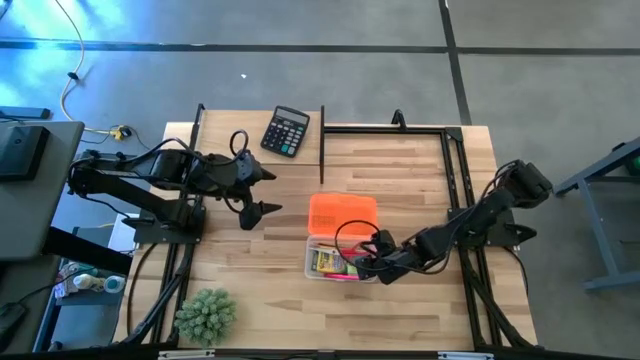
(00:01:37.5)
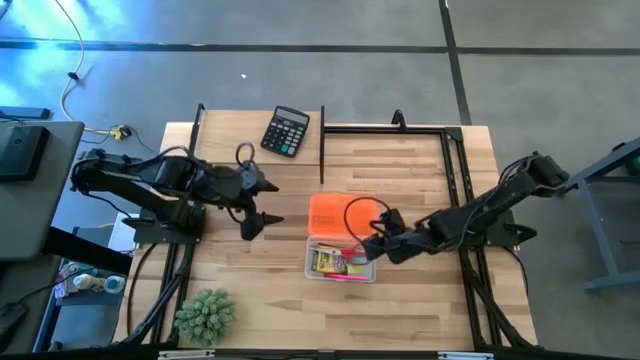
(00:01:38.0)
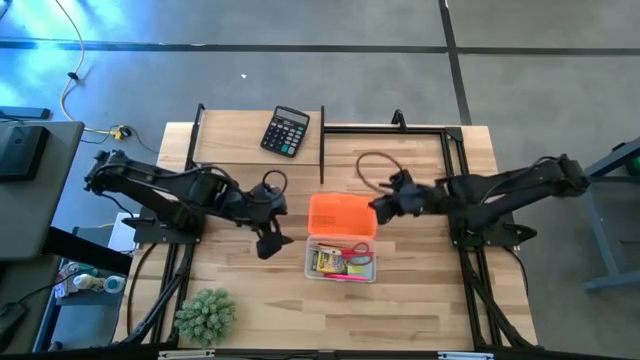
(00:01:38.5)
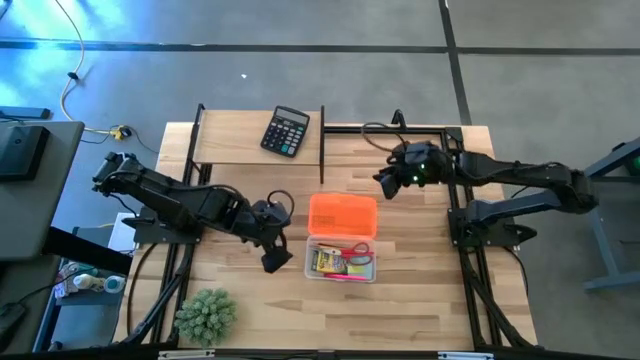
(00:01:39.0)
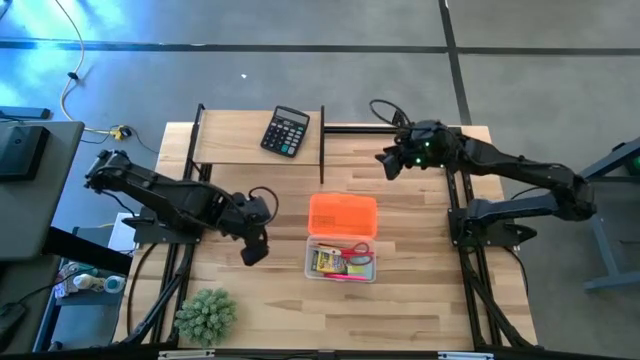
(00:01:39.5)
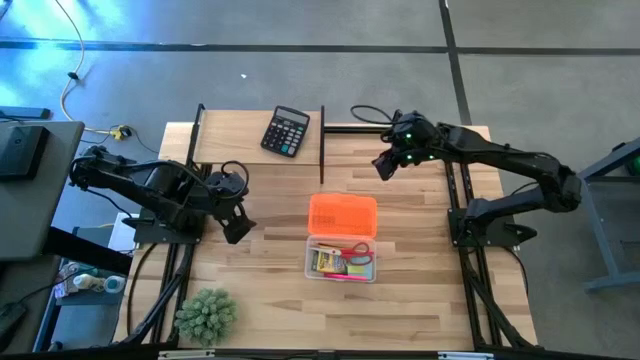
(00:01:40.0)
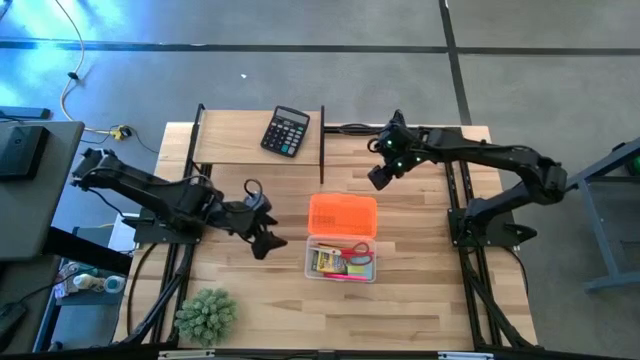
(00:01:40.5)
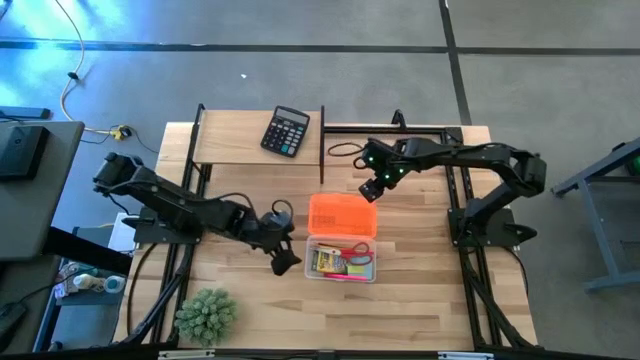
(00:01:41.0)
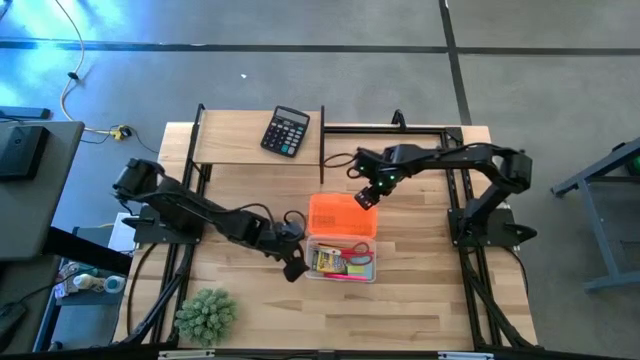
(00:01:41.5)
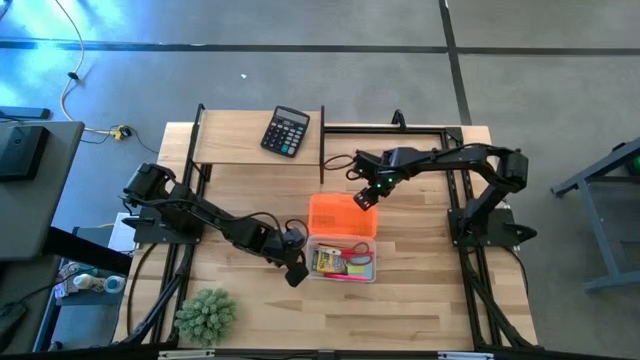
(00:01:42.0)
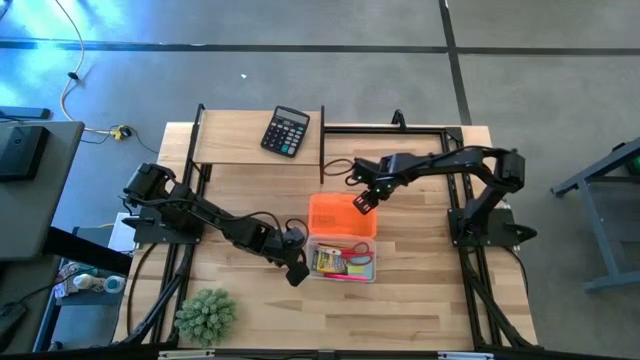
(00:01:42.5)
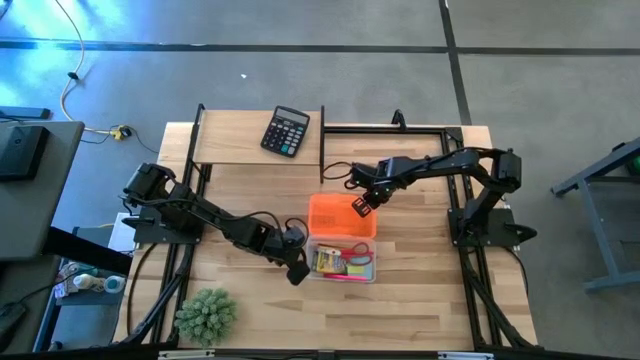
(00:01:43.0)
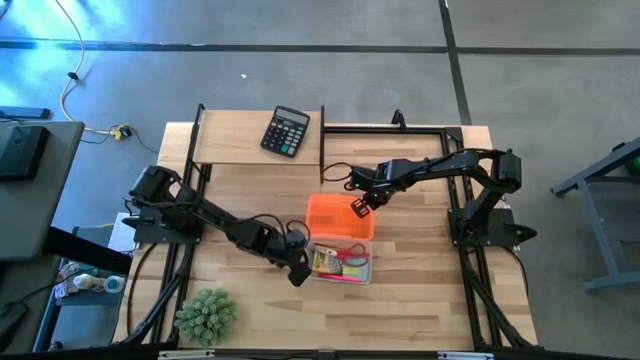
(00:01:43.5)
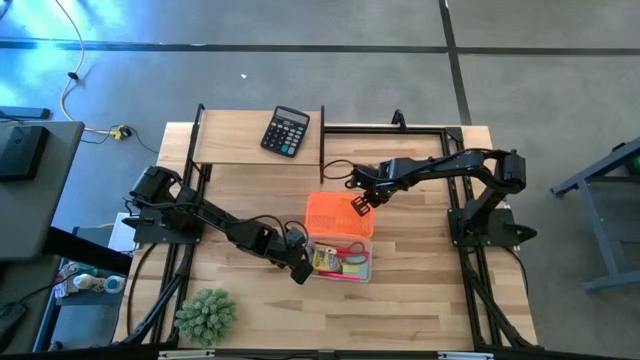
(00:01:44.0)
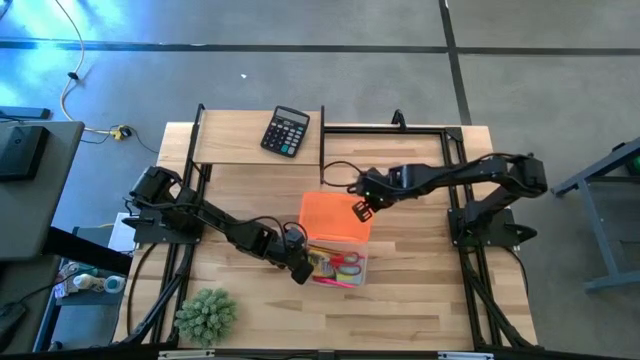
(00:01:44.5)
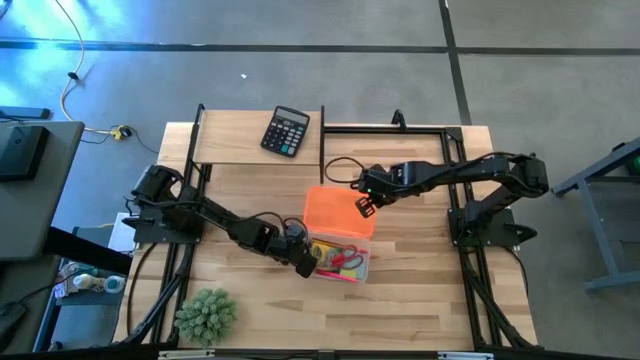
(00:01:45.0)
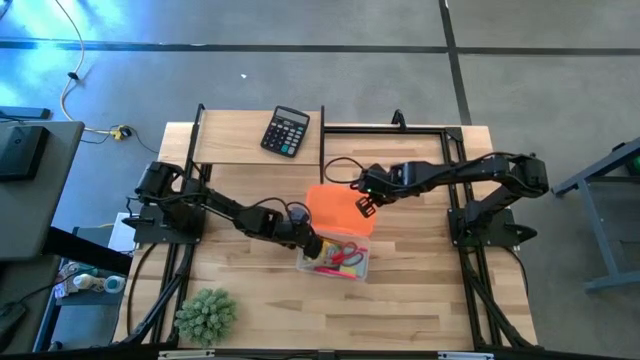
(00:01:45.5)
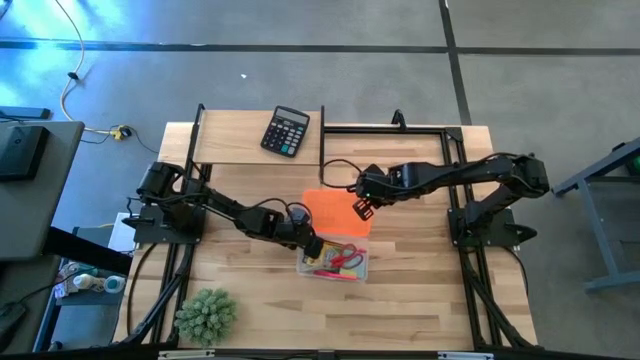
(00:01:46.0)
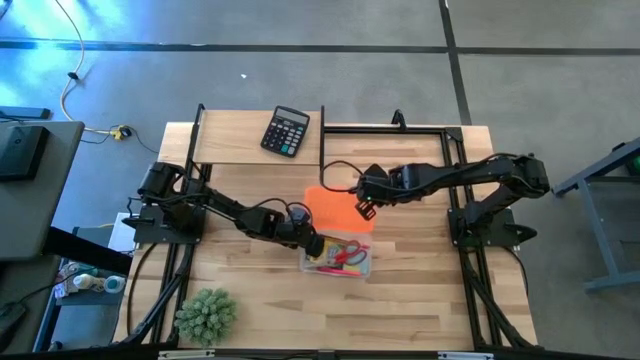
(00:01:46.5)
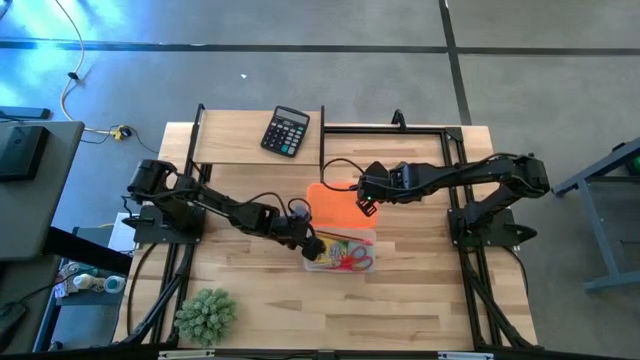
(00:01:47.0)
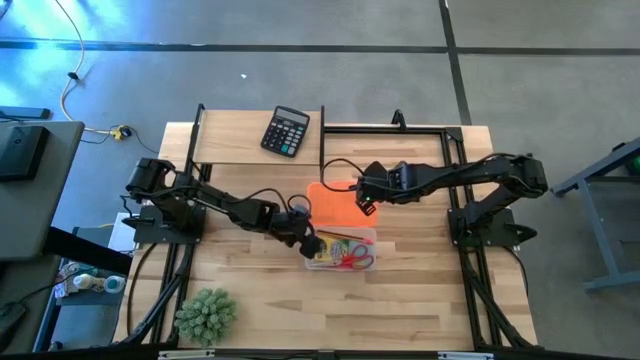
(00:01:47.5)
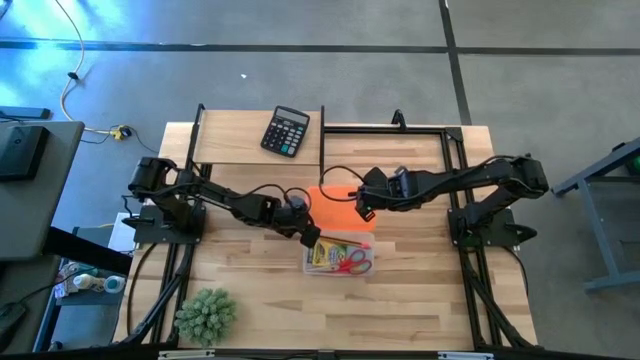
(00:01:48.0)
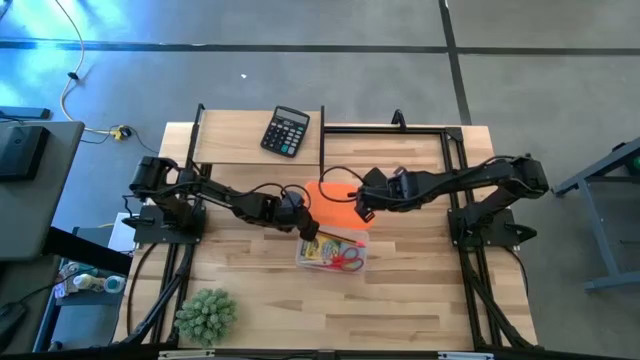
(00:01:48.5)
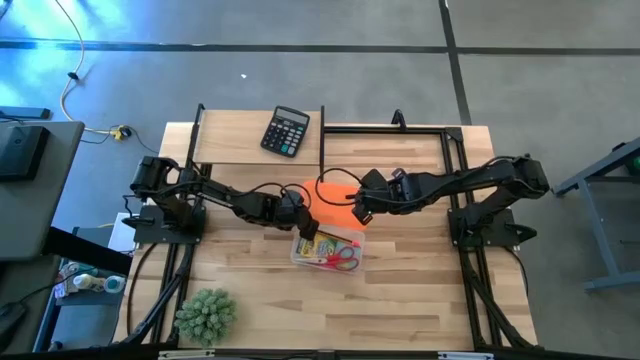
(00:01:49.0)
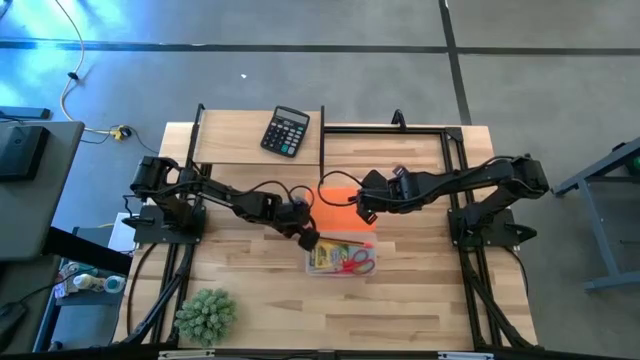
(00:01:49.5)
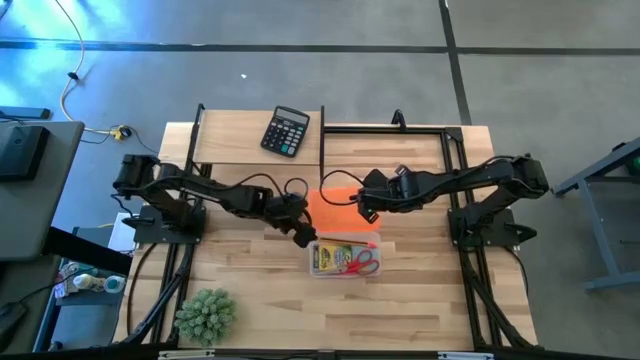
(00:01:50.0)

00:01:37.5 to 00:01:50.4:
Task: Pack school essentials
Close the supply box

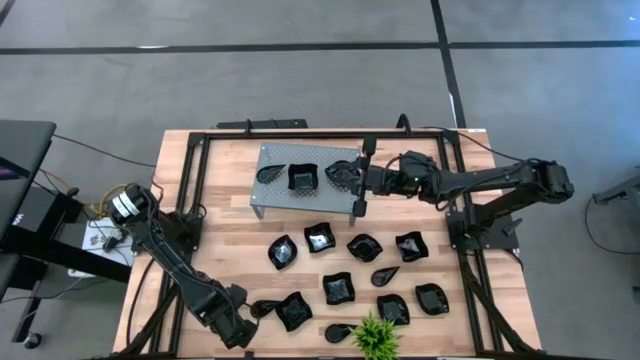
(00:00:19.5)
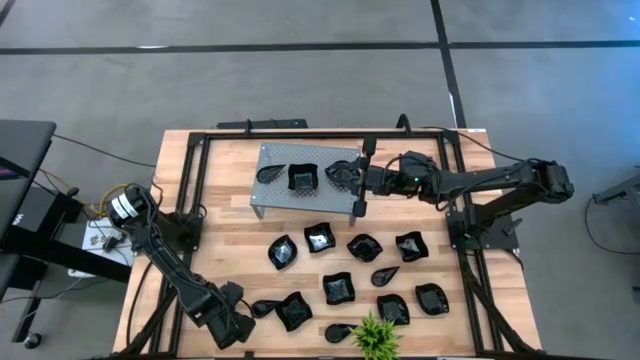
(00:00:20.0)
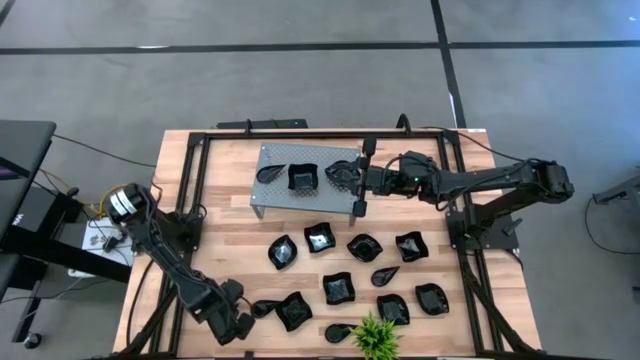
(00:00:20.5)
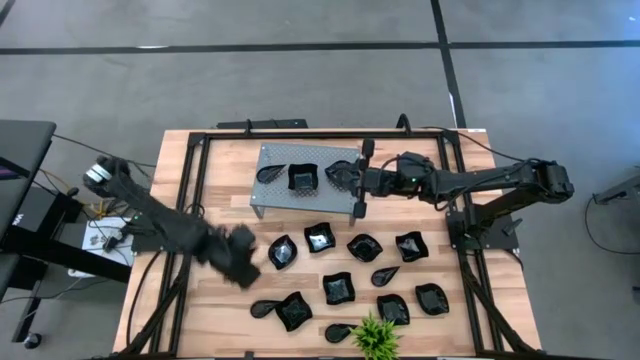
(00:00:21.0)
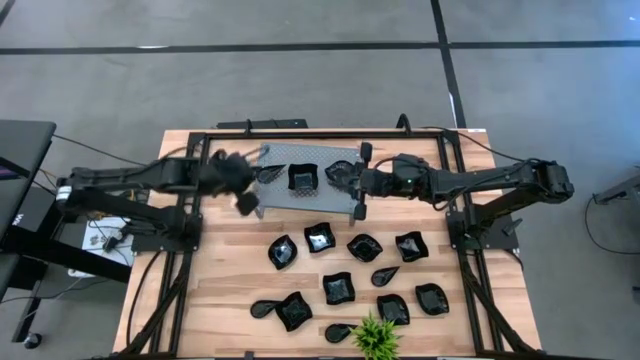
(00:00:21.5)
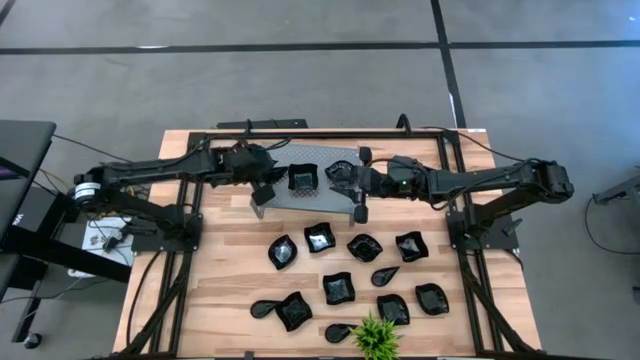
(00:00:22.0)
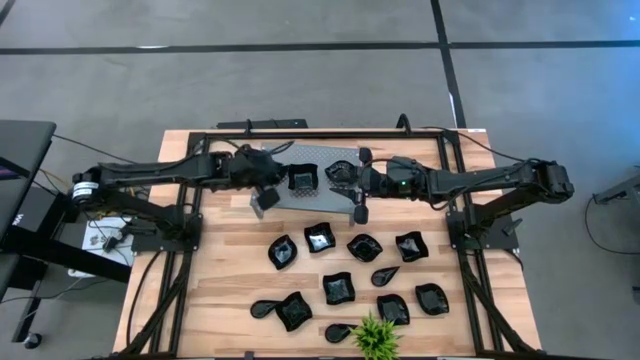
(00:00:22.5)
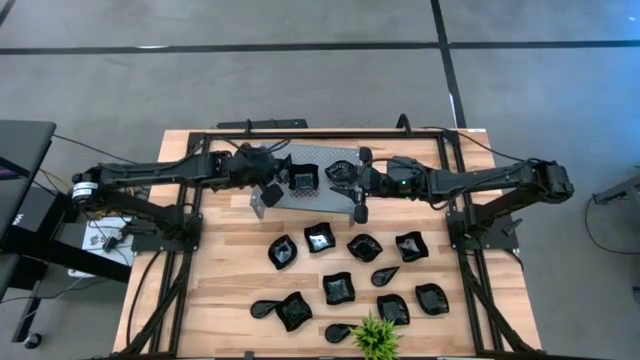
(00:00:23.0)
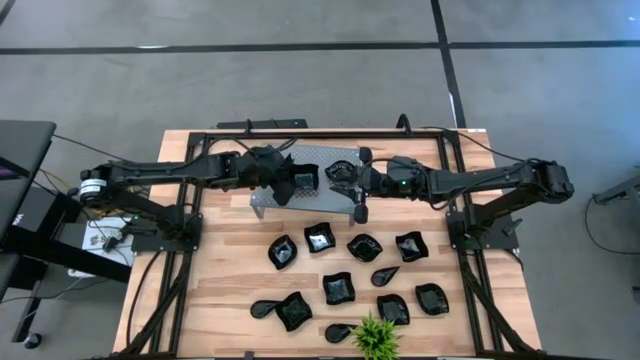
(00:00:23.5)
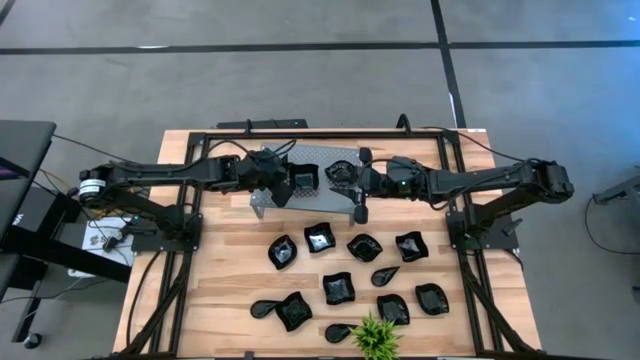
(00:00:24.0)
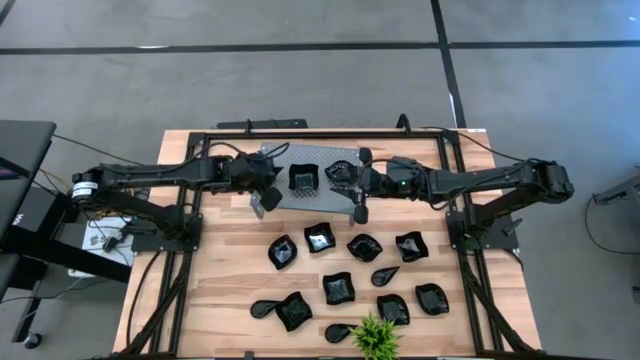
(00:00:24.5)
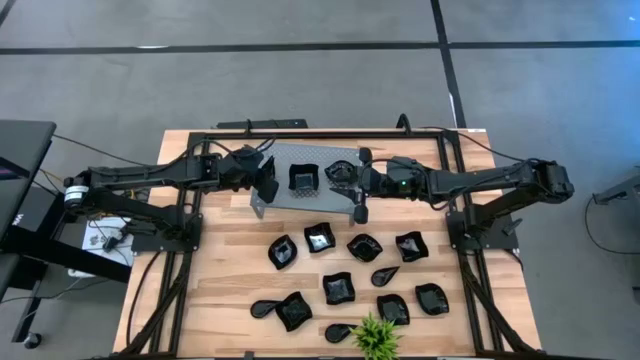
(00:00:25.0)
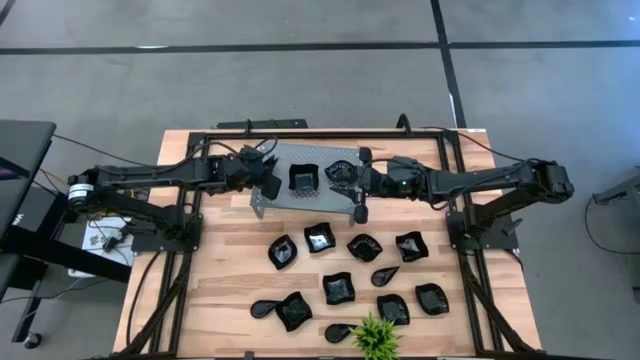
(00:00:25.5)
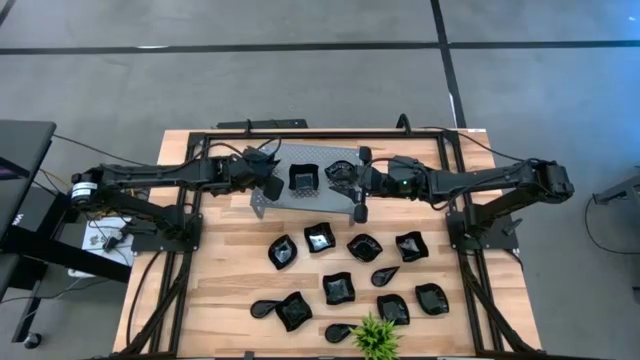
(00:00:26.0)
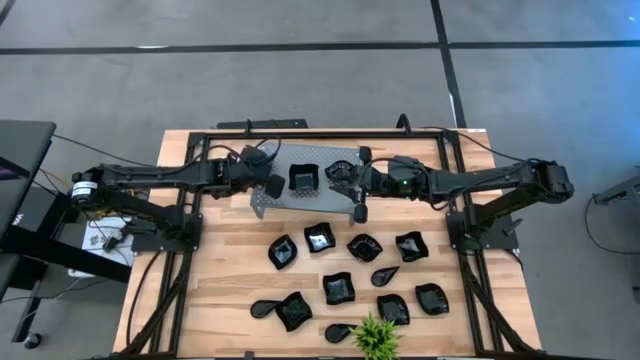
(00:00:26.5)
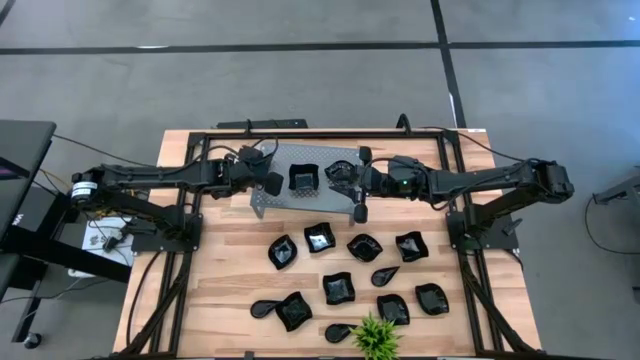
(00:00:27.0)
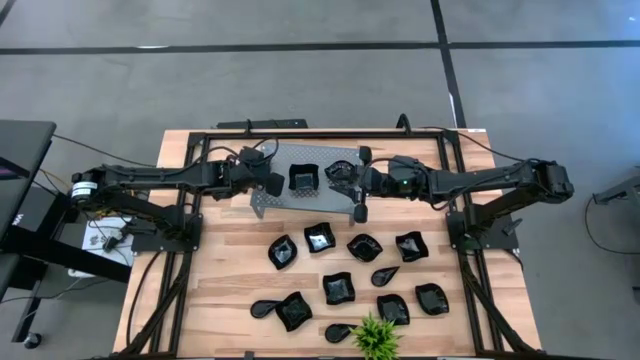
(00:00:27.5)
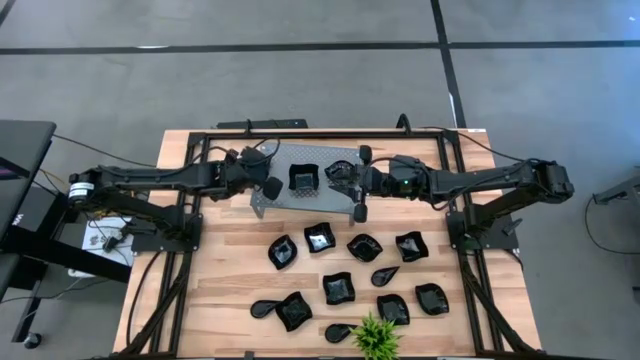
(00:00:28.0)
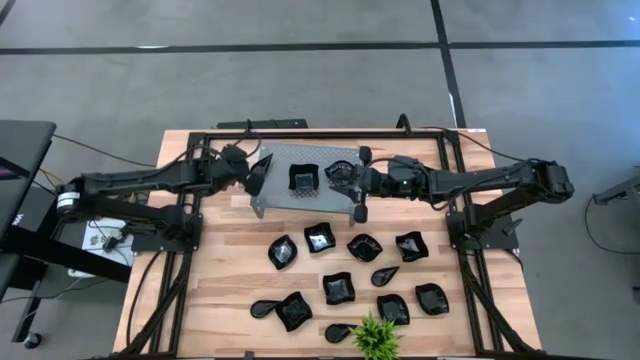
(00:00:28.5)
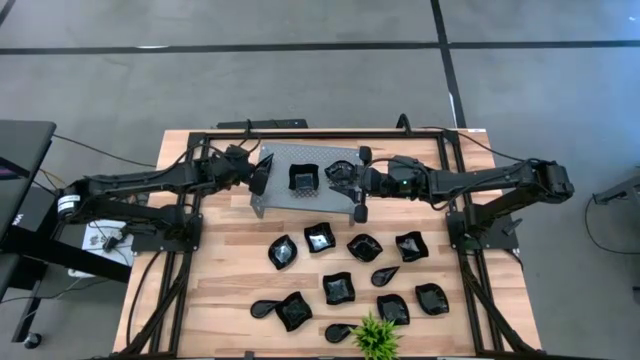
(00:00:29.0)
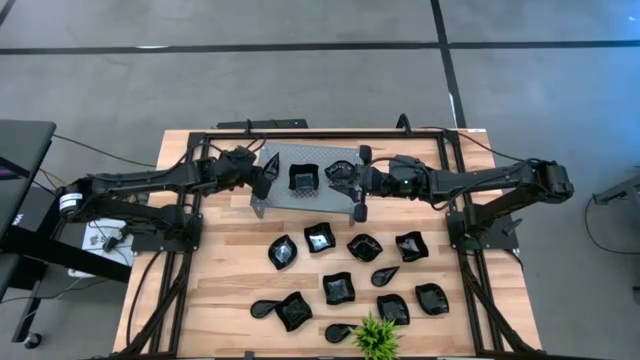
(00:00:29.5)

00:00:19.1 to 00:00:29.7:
Task: Pick & Place Mini shaped plates
Stack the black drop-shaped plate on top of the black drop-shaped plate on the shelf
